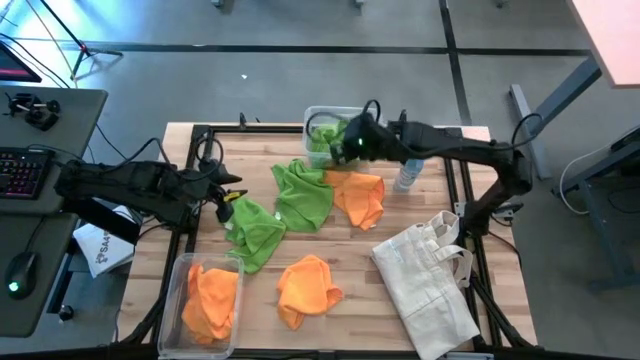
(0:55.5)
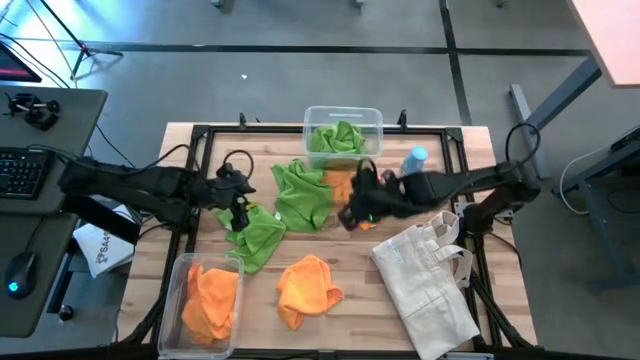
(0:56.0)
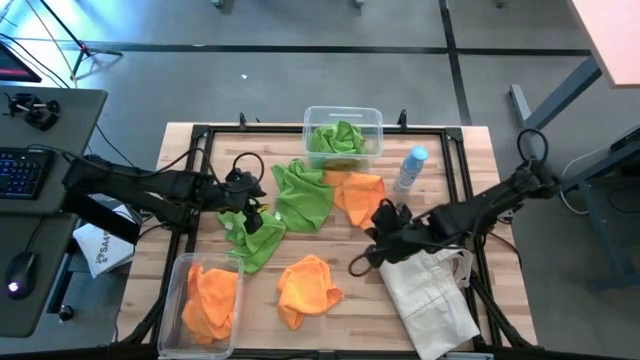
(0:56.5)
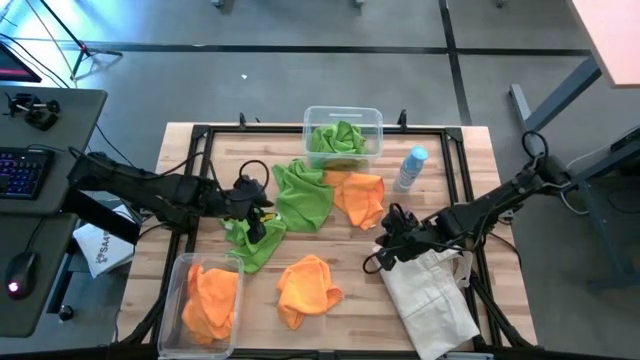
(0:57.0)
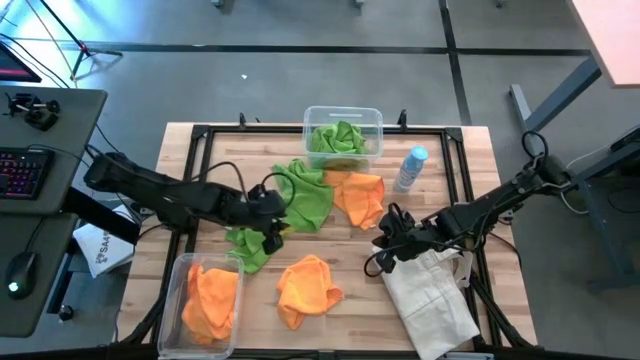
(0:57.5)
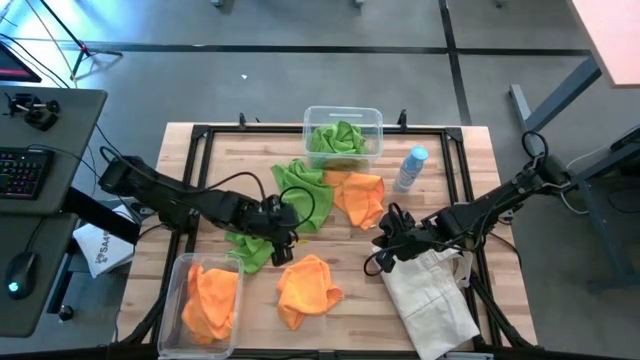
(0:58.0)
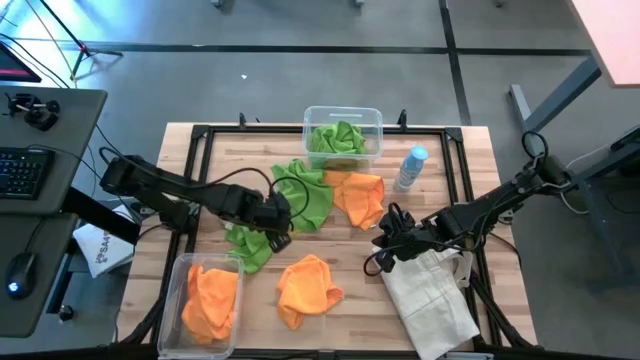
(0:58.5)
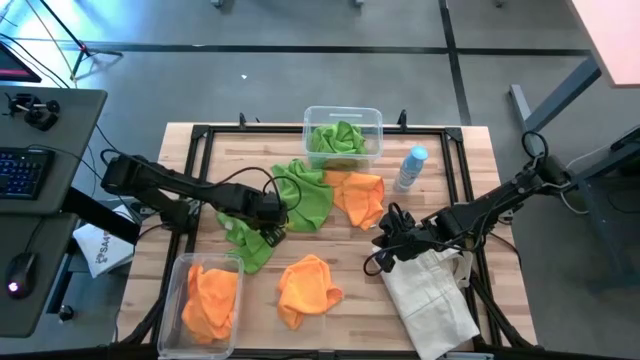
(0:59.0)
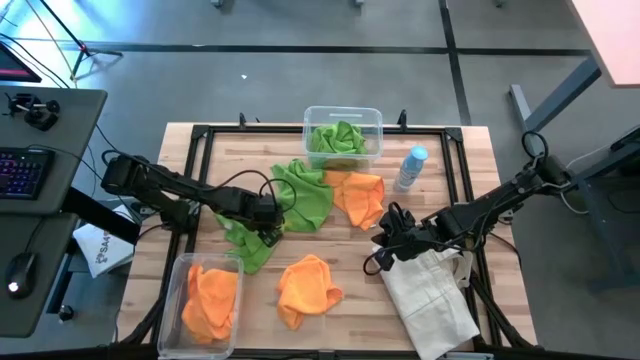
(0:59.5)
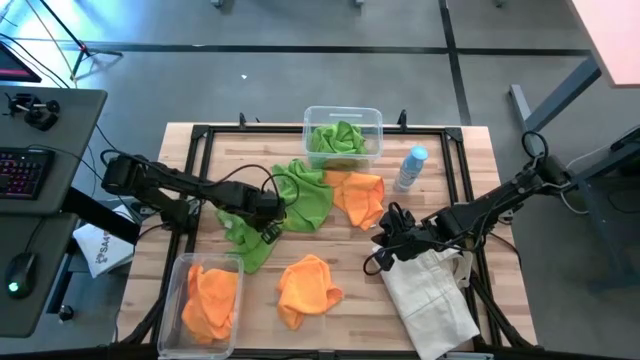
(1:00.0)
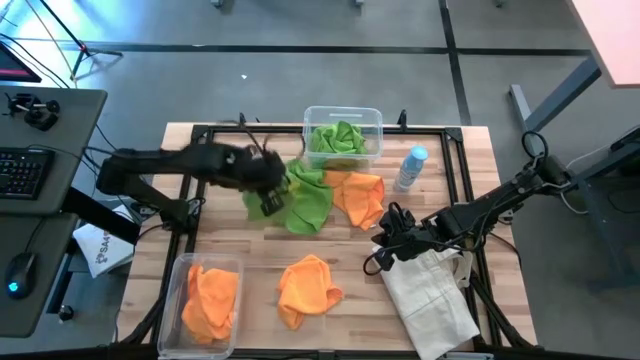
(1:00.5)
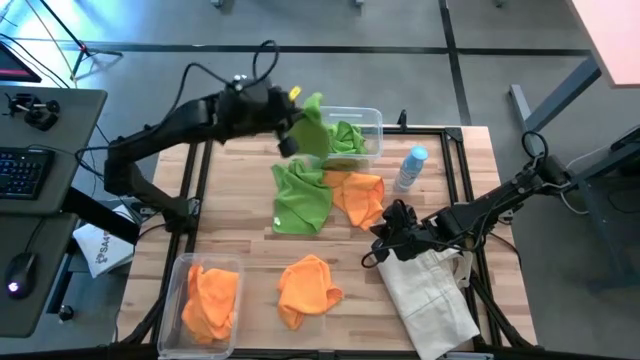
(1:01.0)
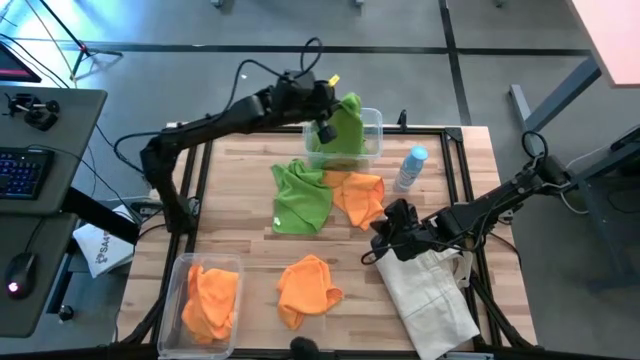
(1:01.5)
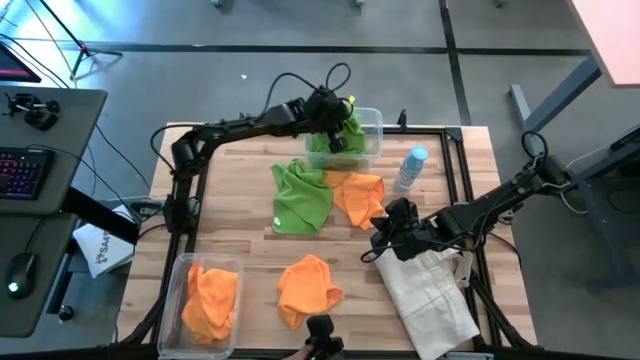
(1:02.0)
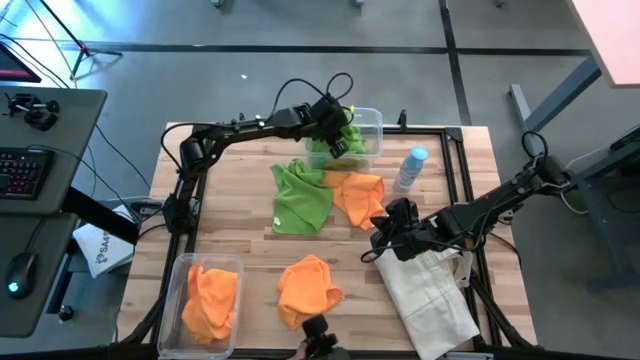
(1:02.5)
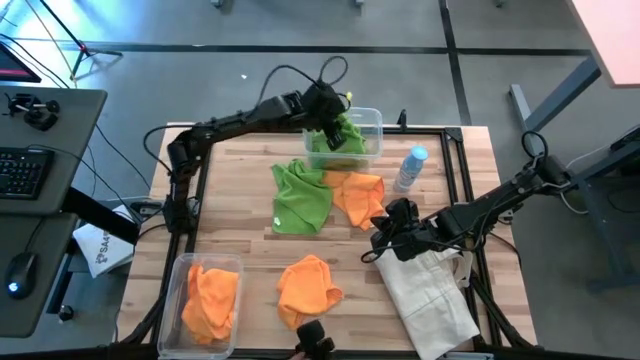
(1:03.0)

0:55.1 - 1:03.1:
Task: Sort microfiber towel by color & place in baskets
Put the green microfiber towel into the top transparent bin

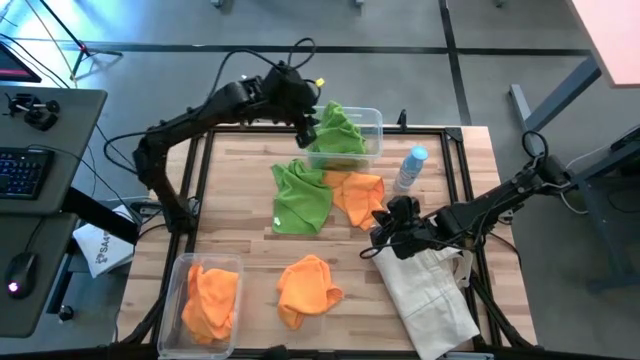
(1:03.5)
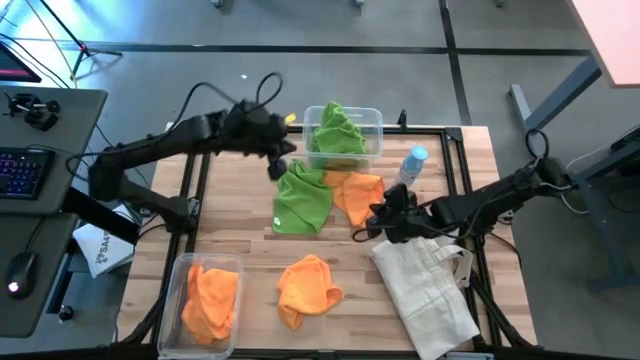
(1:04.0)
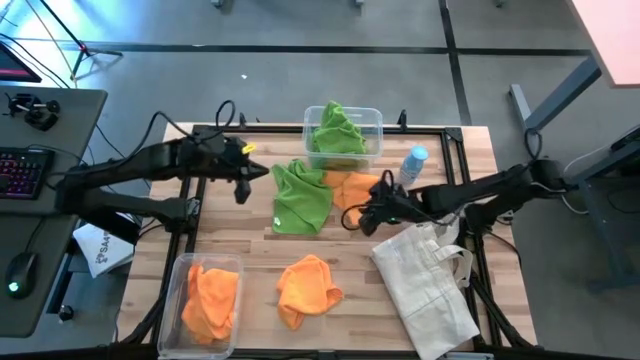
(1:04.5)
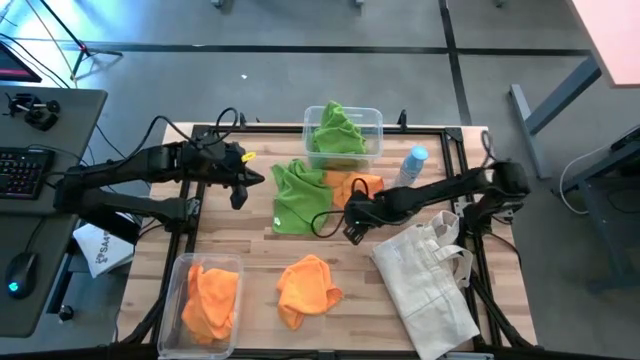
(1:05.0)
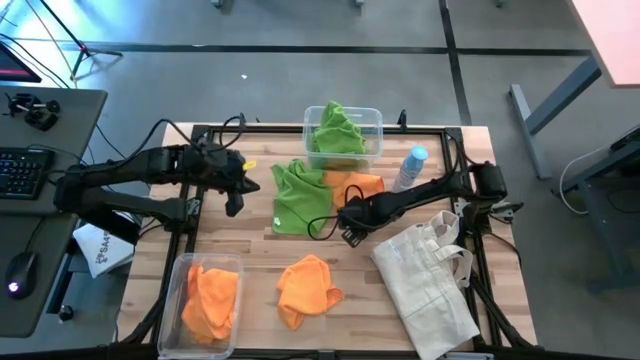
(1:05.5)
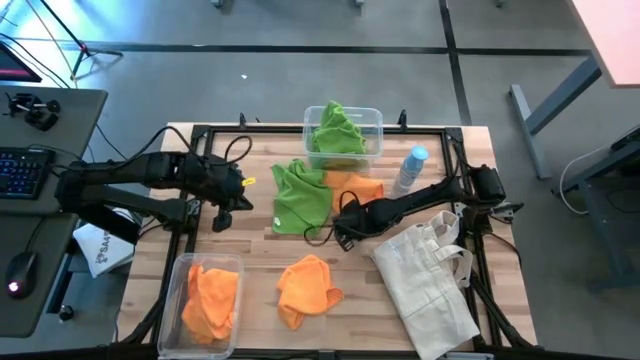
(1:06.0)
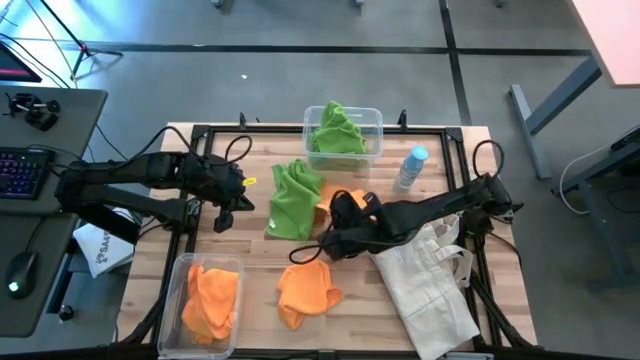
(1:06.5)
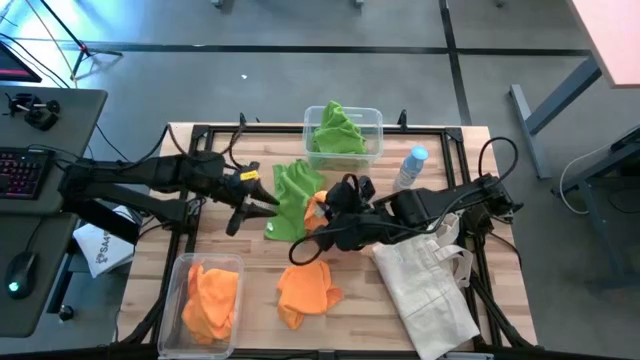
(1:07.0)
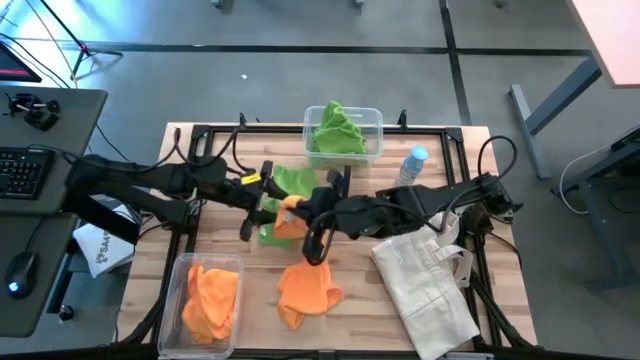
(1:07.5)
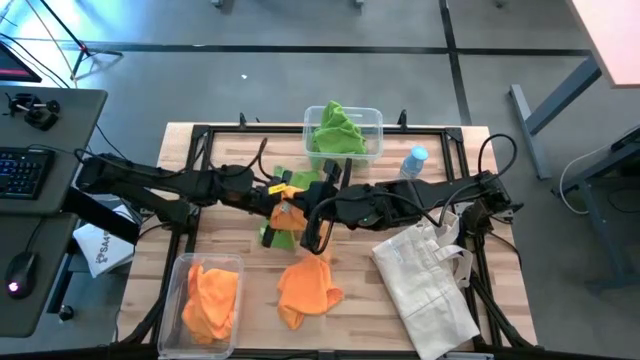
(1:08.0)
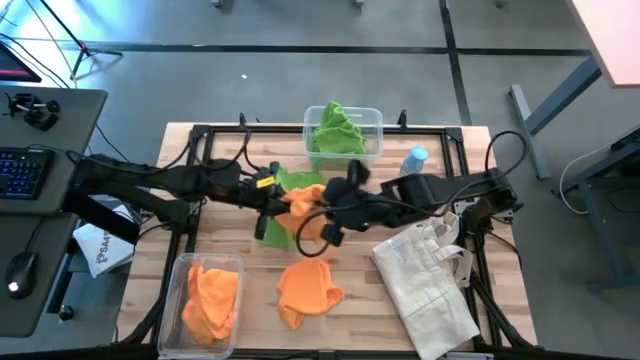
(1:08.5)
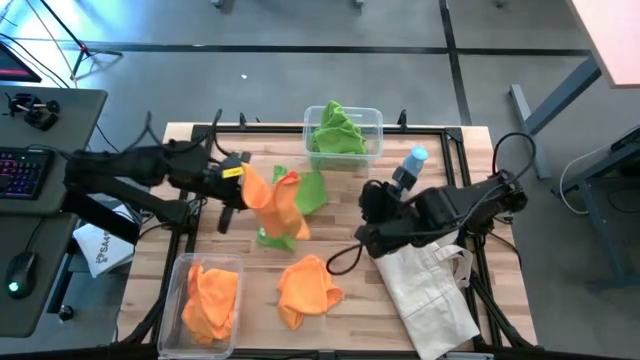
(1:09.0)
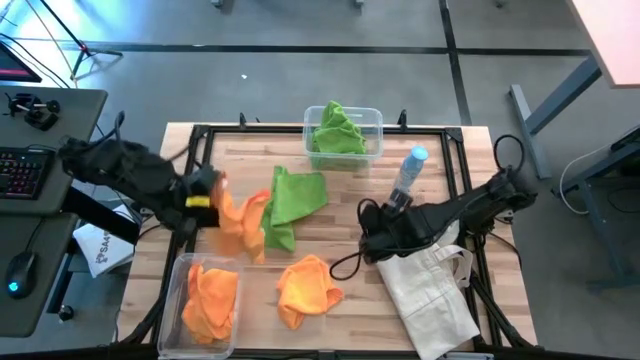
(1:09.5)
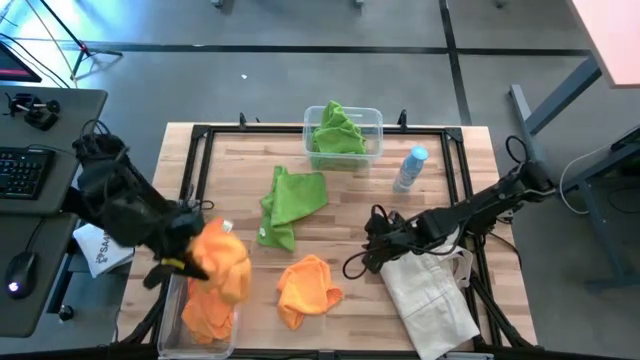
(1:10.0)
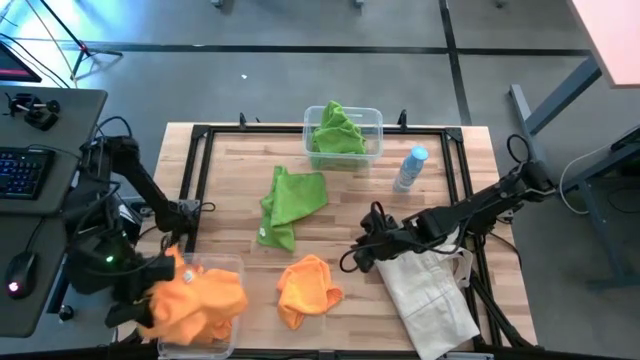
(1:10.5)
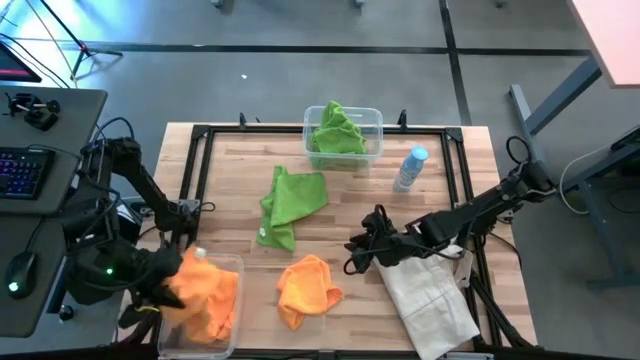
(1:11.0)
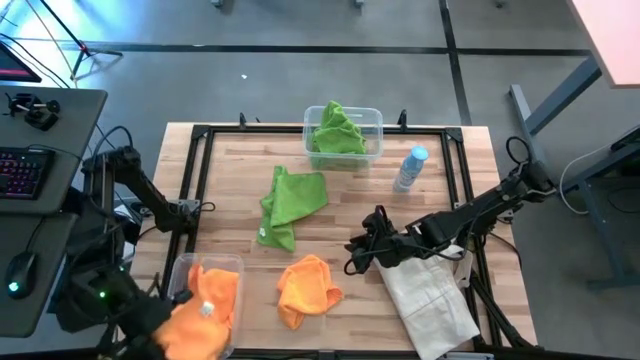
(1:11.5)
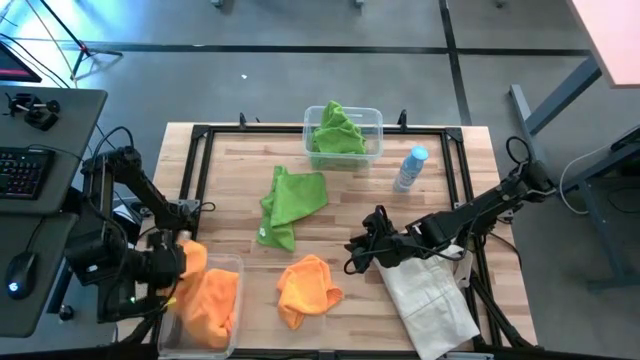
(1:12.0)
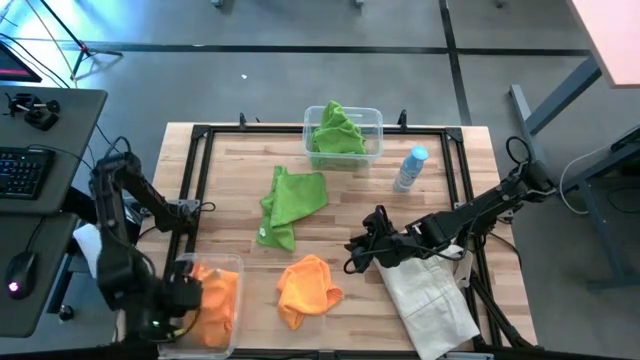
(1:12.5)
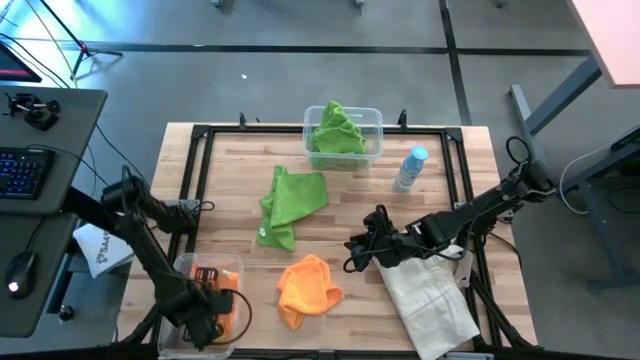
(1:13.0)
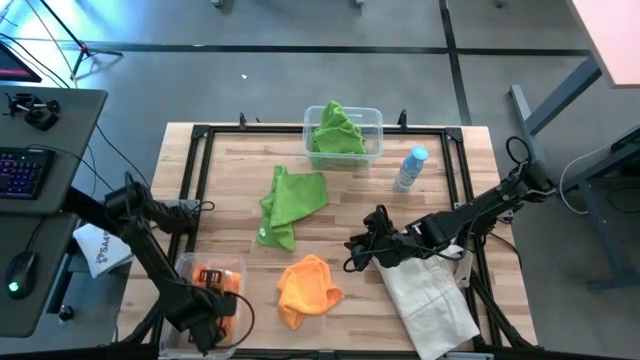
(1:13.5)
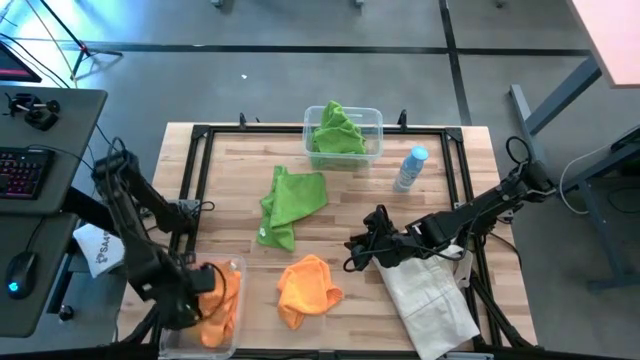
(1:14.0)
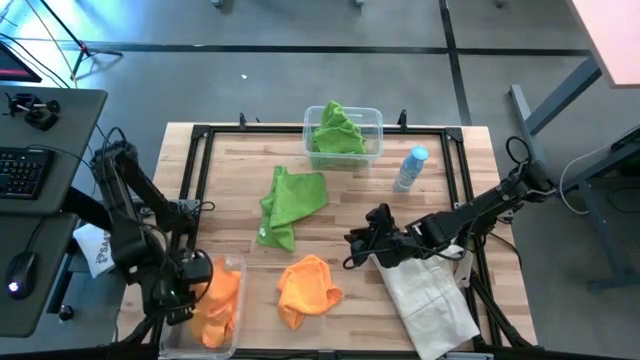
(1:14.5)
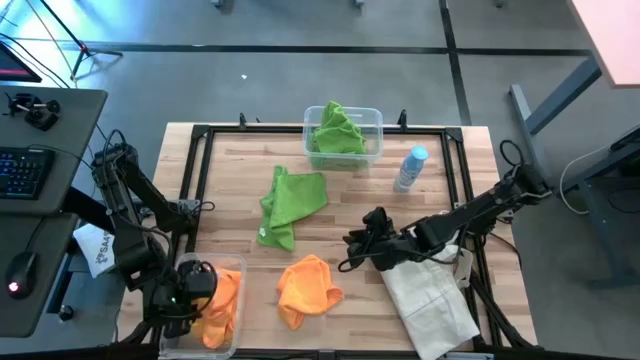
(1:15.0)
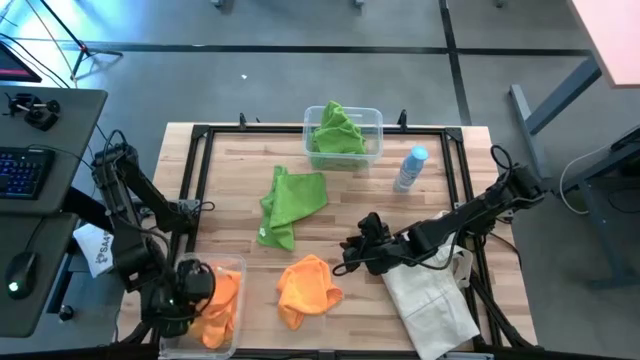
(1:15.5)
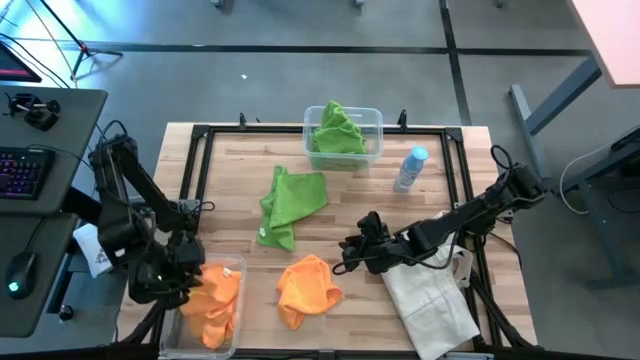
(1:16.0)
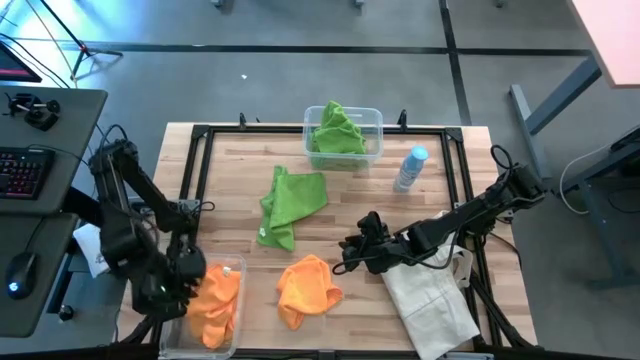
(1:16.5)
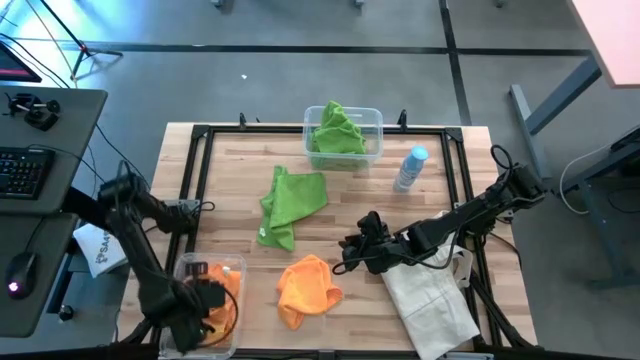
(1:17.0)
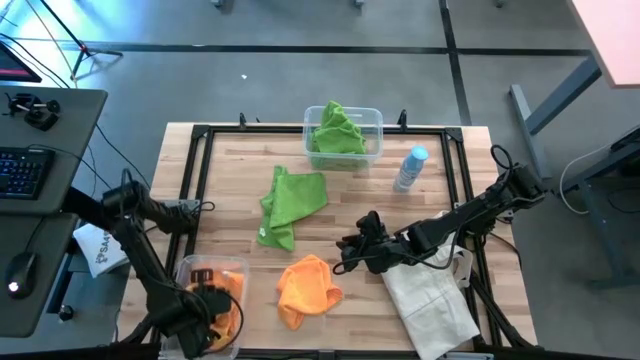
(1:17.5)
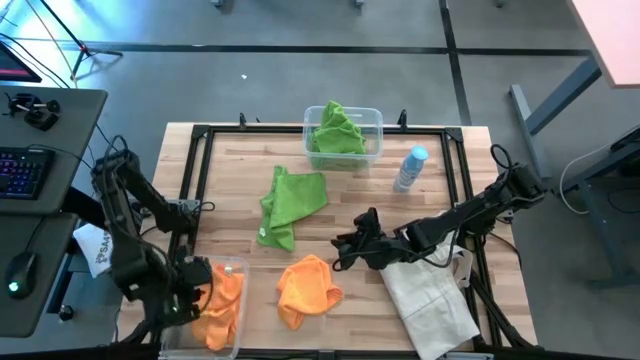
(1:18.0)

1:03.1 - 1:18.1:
Put the orange microfiber towel into the bottom transparent bin
